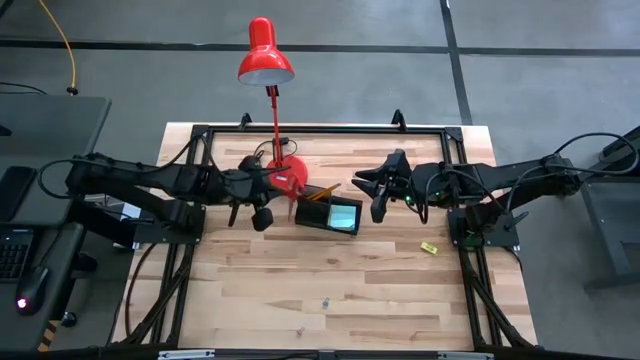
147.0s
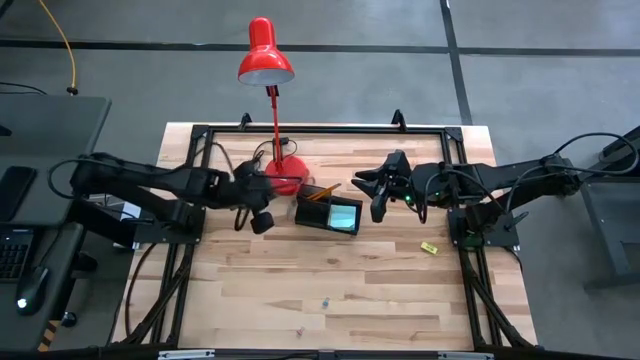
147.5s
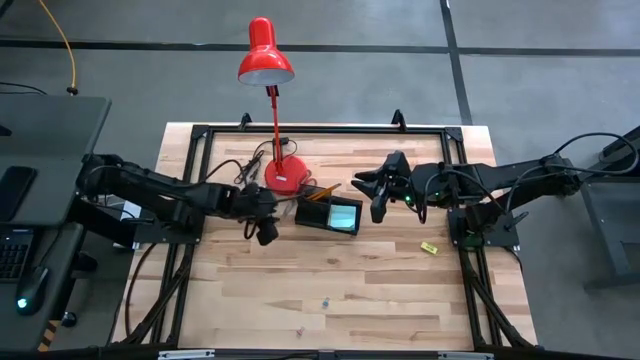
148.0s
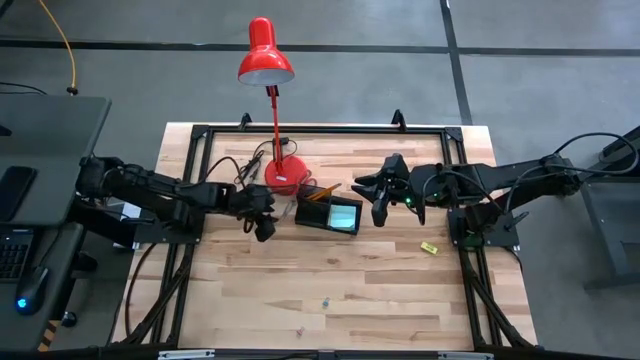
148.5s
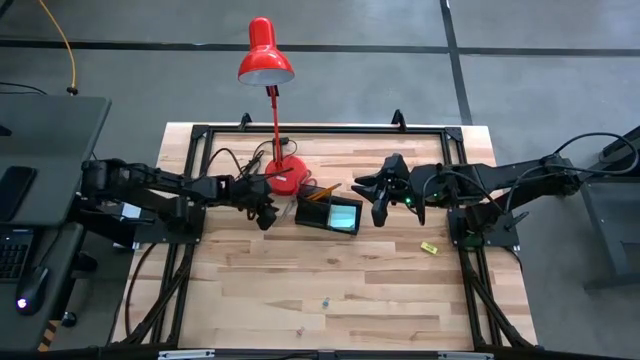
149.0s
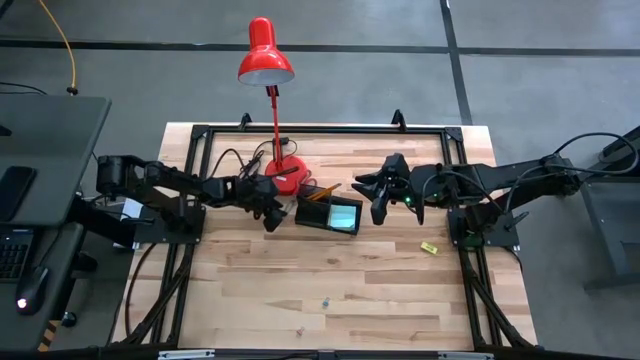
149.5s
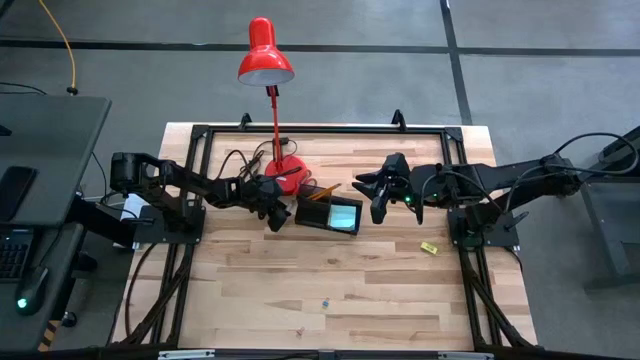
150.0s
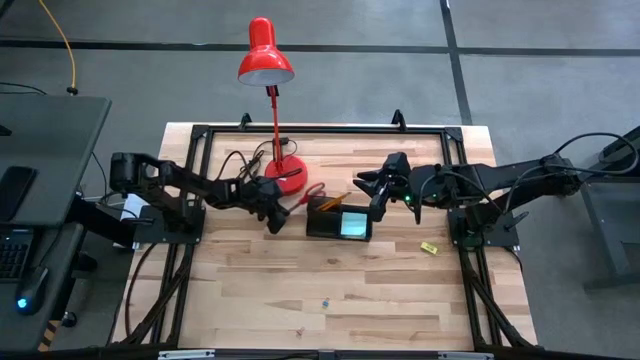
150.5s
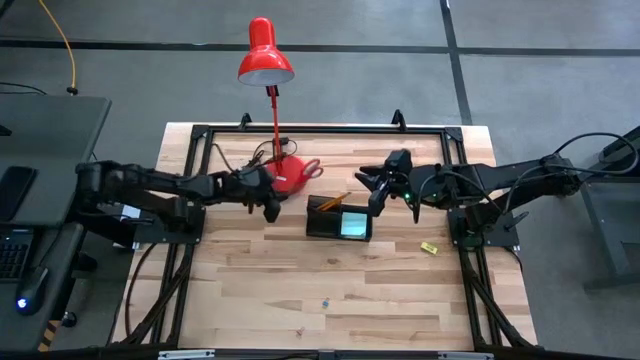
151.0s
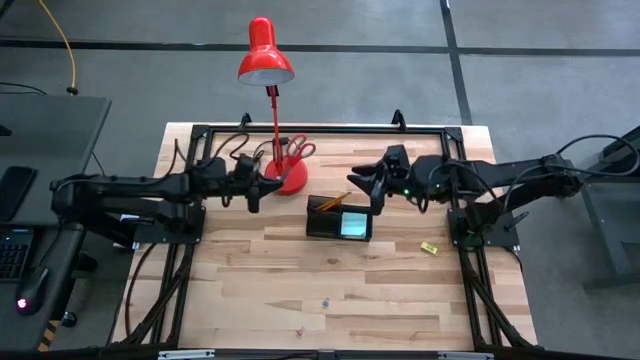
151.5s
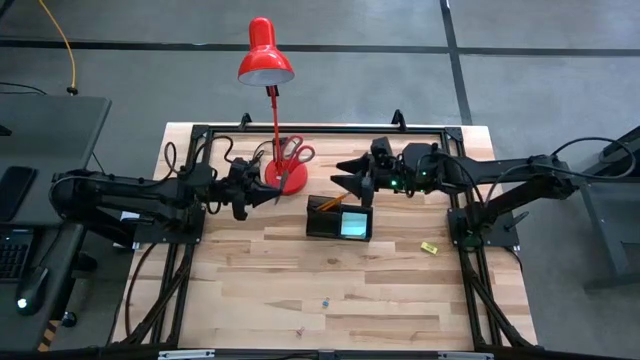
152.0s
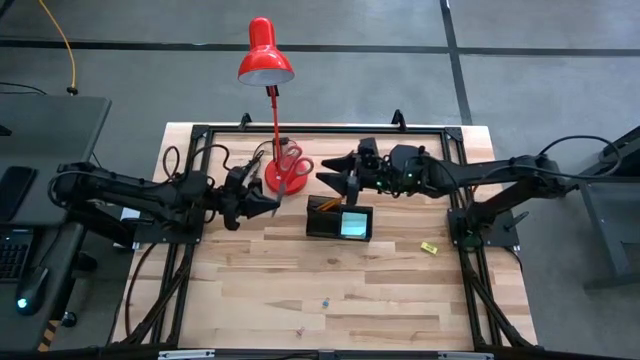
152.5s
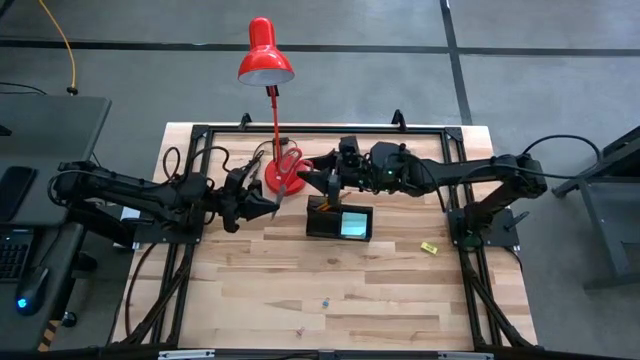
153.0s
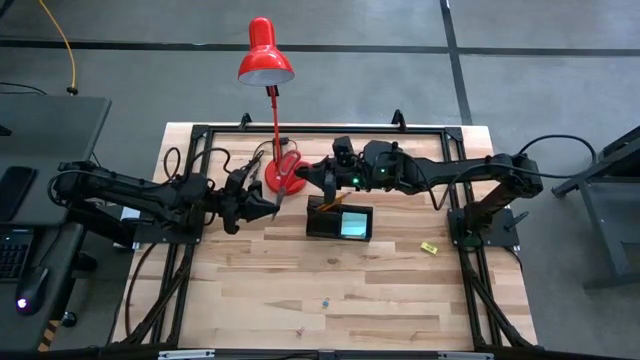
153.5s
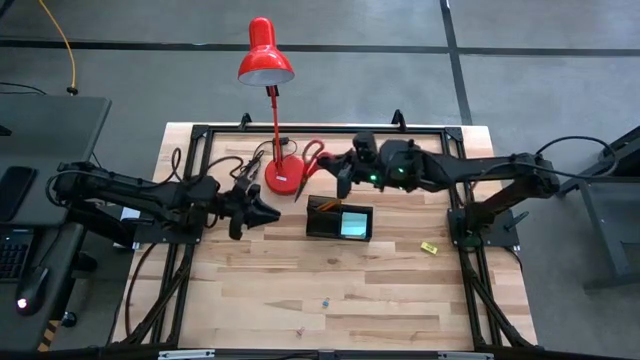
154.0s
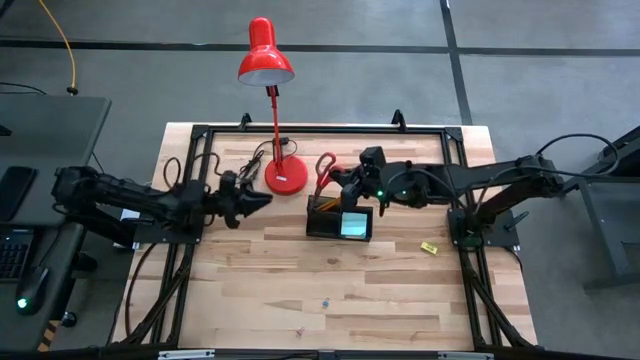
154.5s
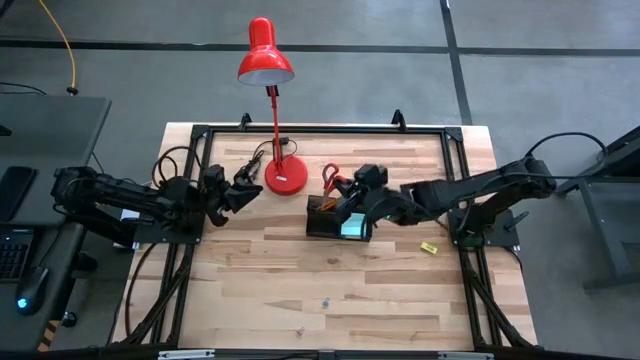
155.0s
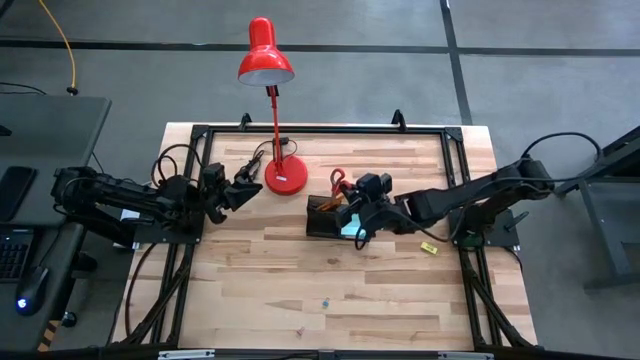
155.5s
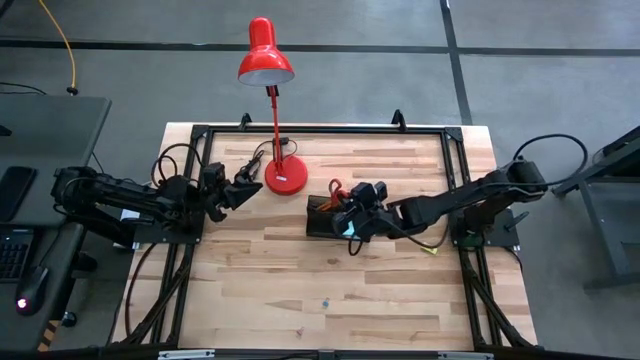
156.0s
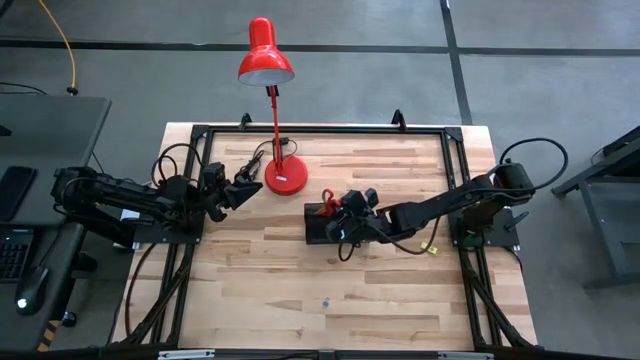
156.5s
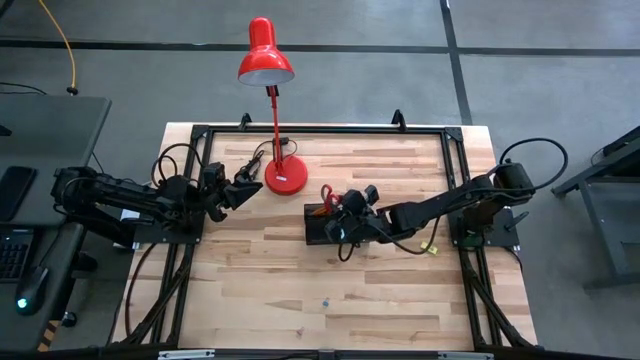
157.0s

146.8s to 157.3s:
Task: Pick and place office supplies into organizer
Put the red scissors into the black desk organizer

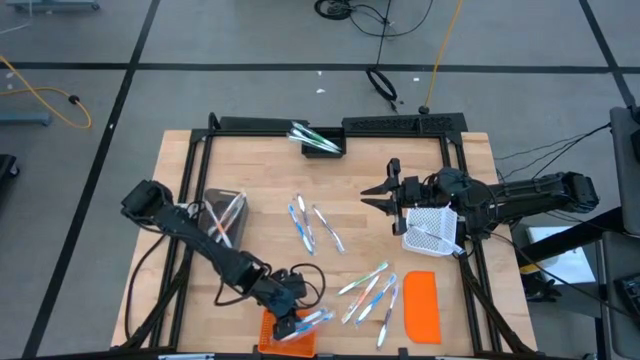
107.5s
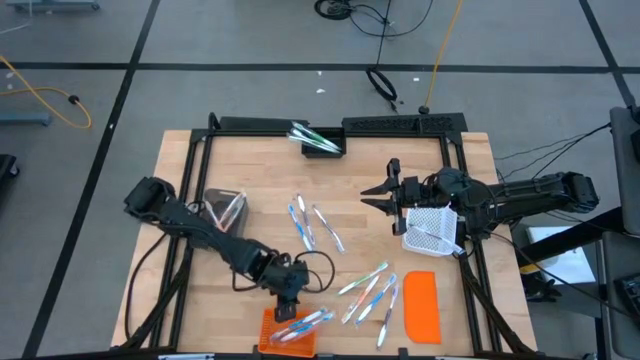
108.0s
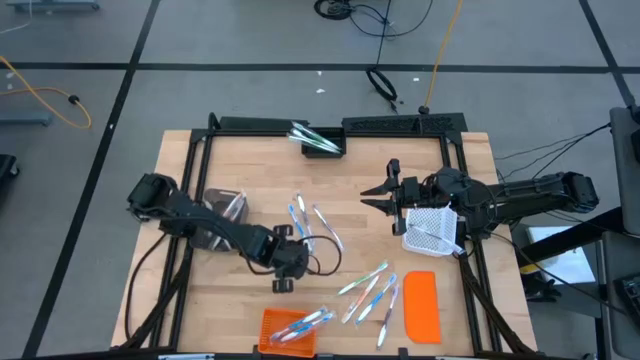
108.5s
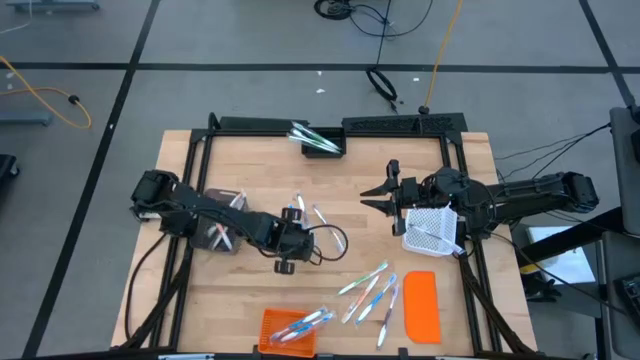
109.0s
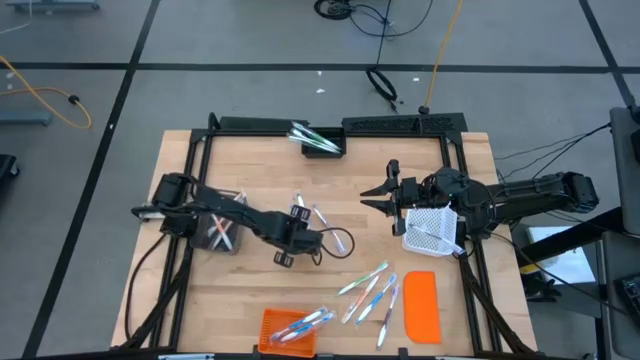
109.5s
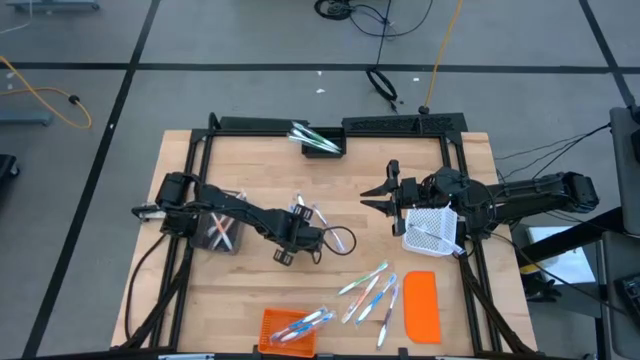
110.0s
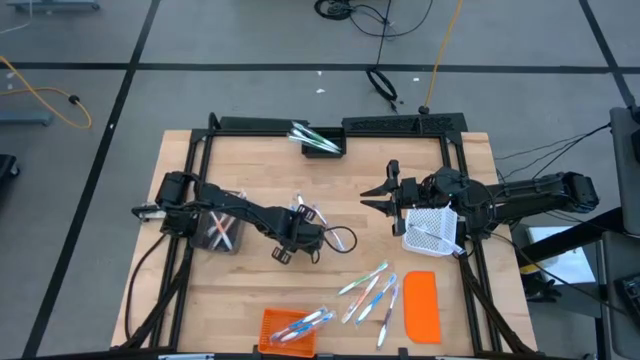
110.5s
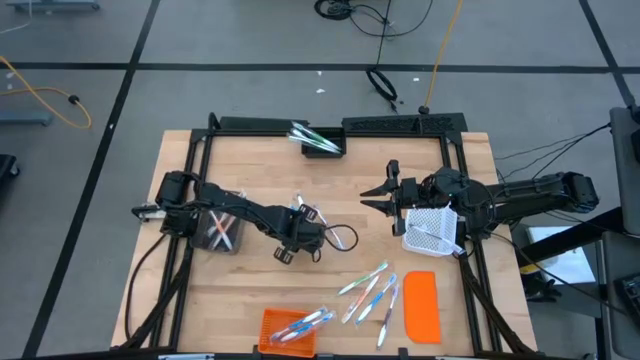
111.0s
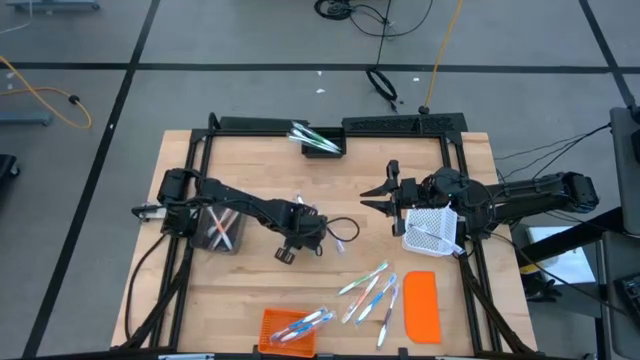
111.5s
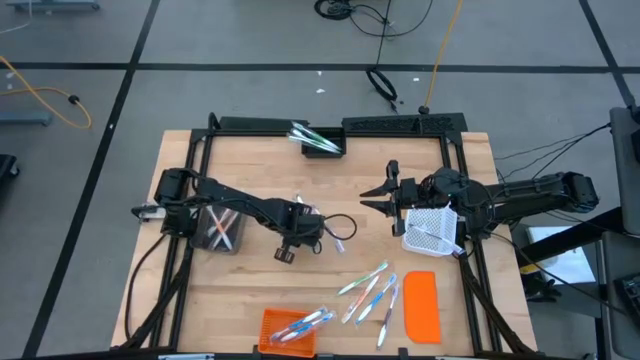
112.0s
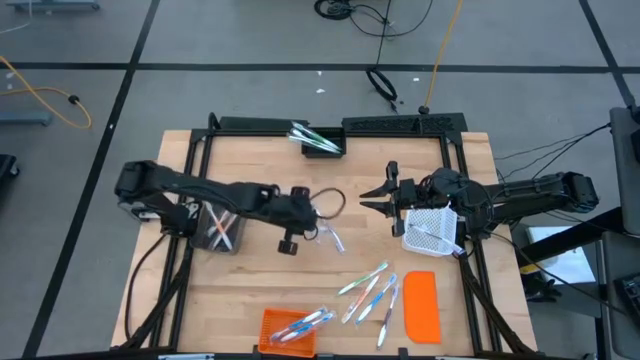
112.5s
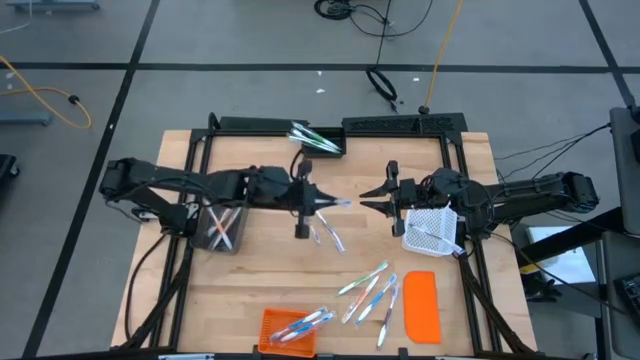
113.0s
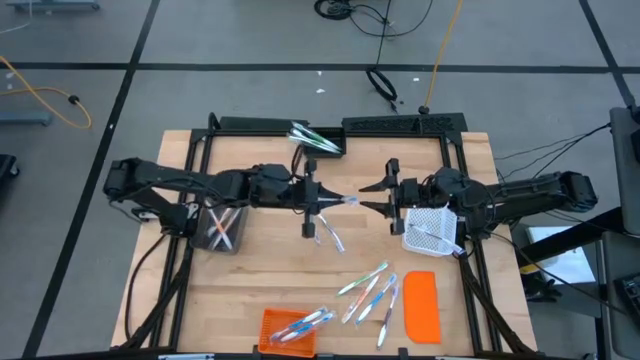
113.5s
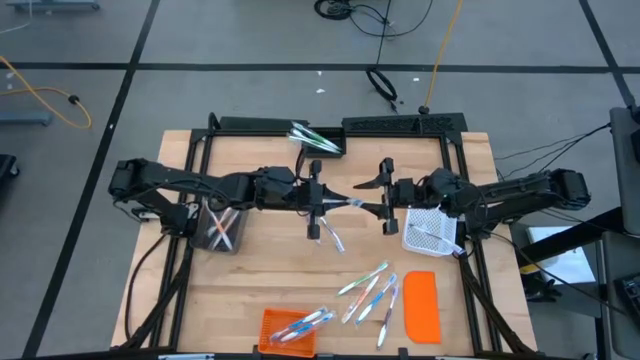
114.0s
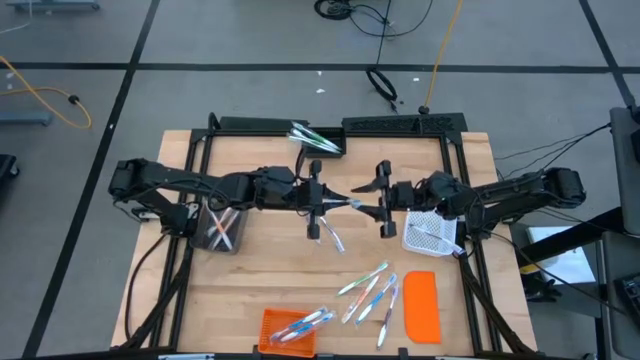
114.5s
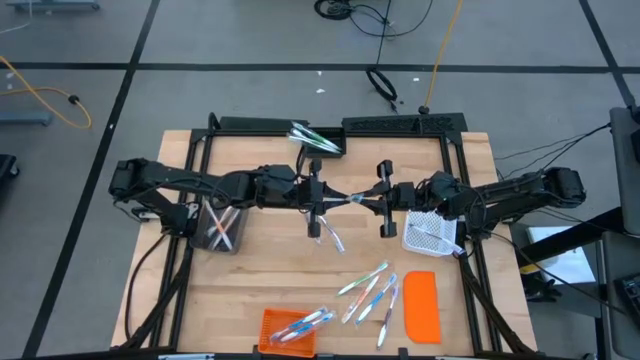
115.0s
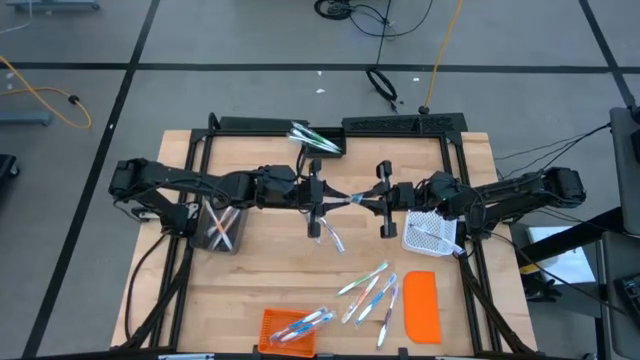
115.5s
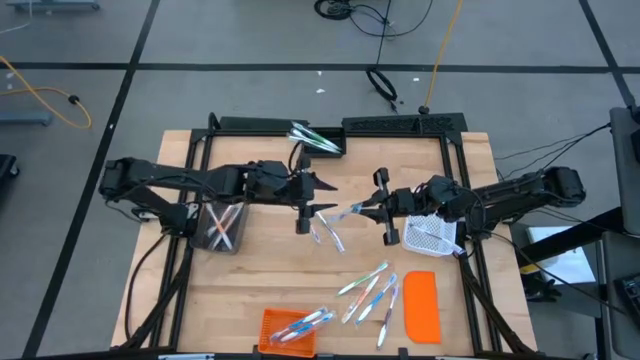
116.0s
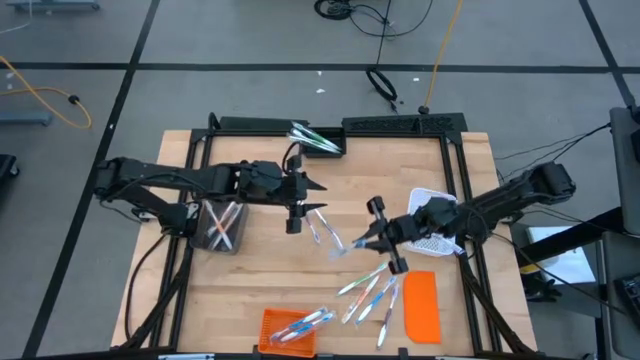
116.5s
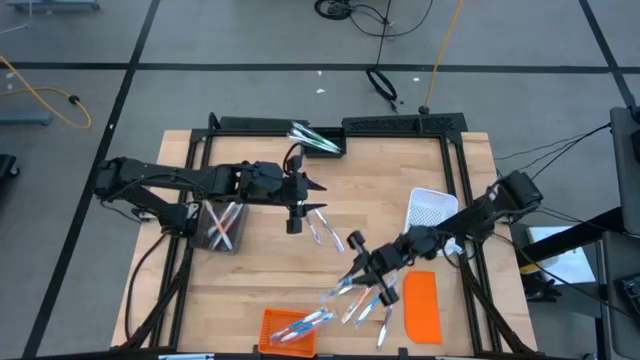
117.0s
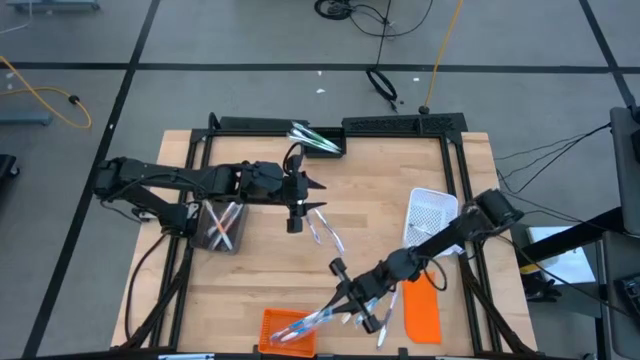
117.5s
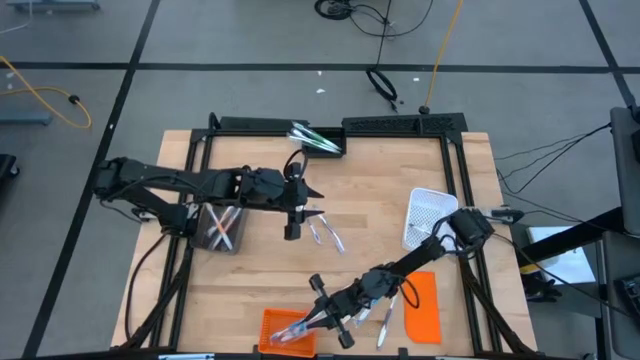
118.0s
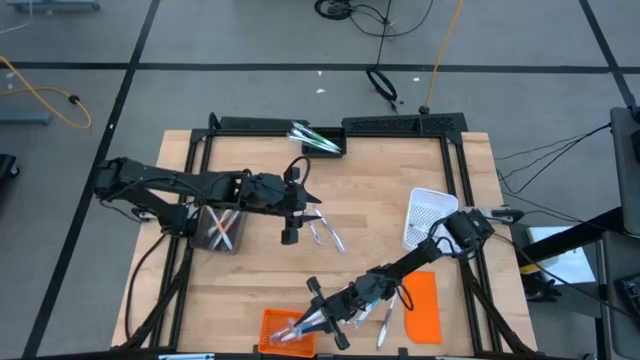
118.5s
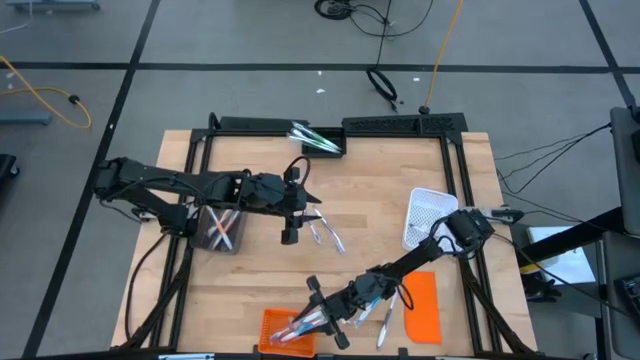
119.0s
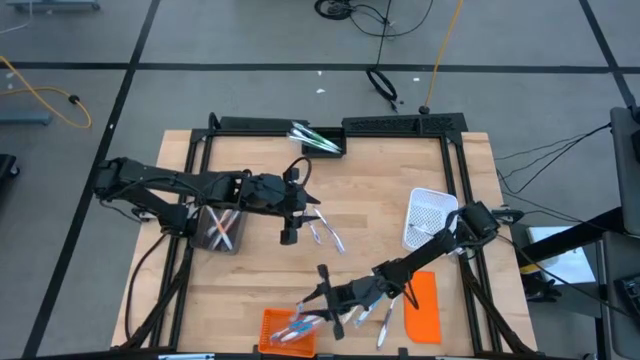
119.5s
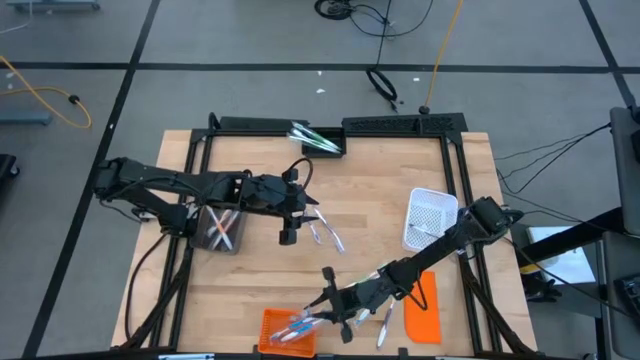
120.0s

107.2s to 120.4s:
Task: Pick & Place Toothbrushes
Put the blue toothbrush into the orange bin
